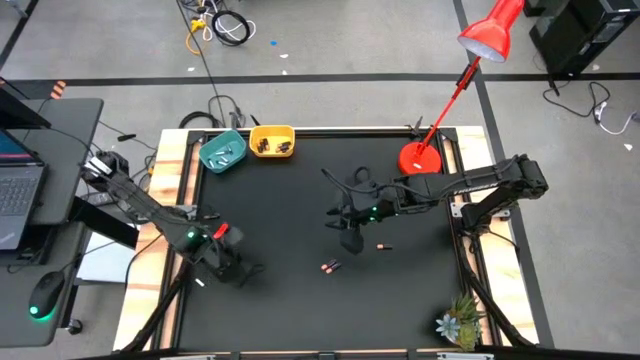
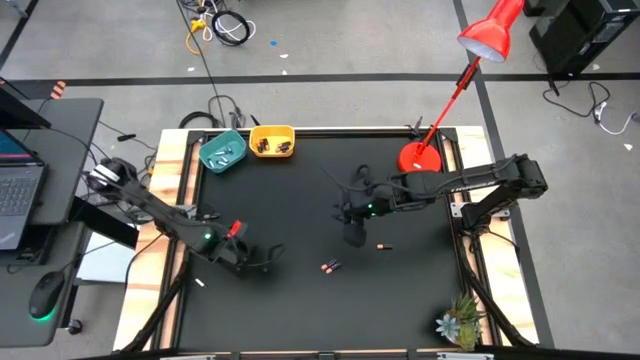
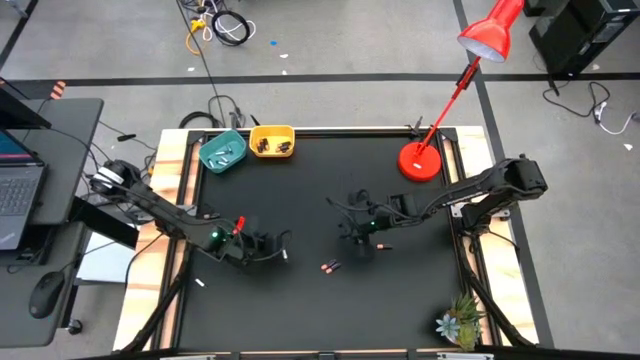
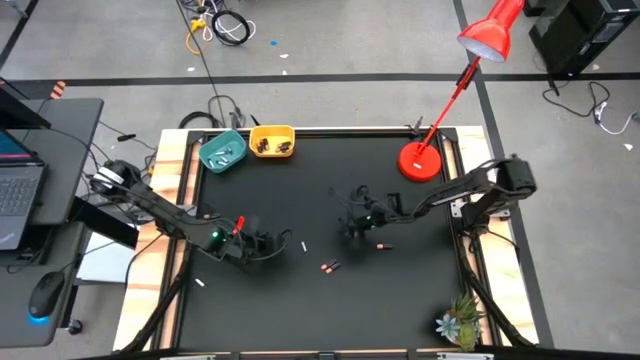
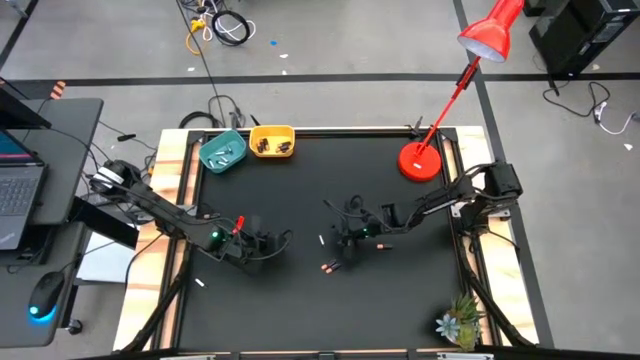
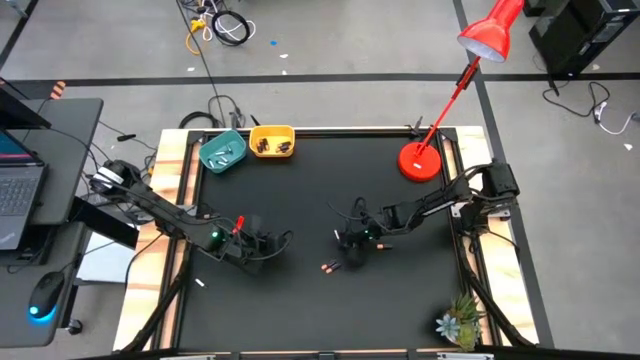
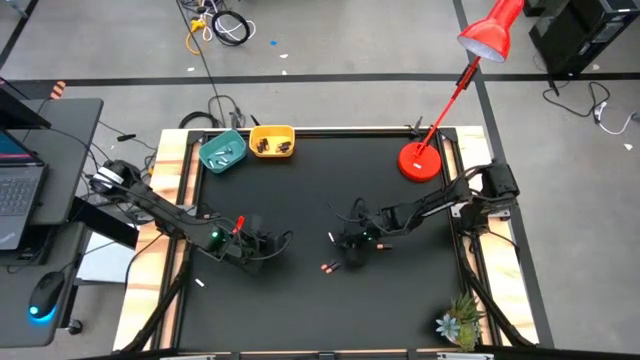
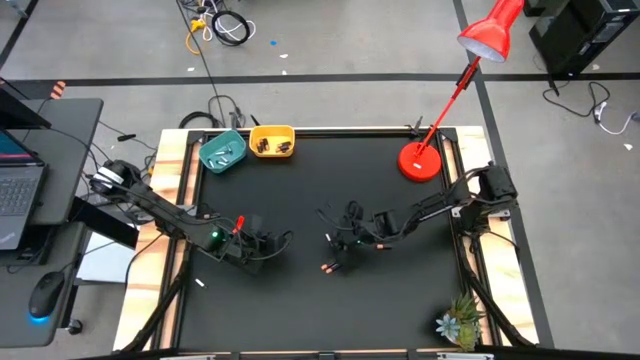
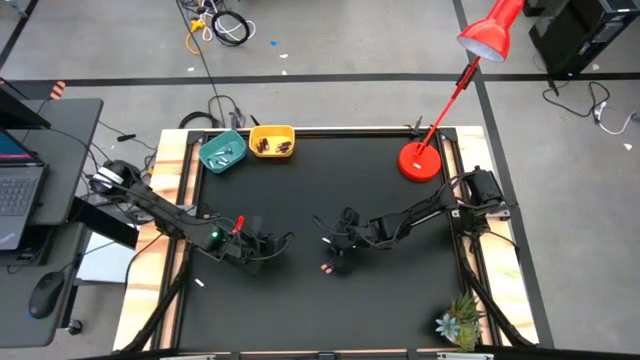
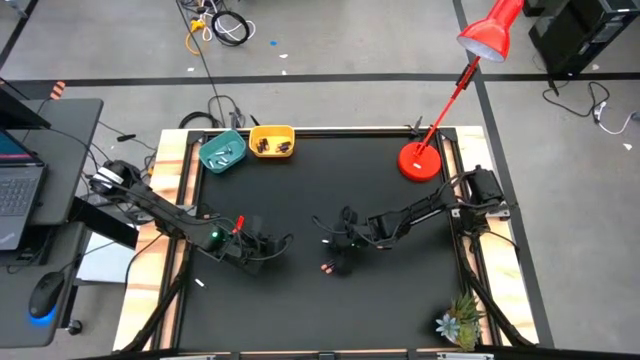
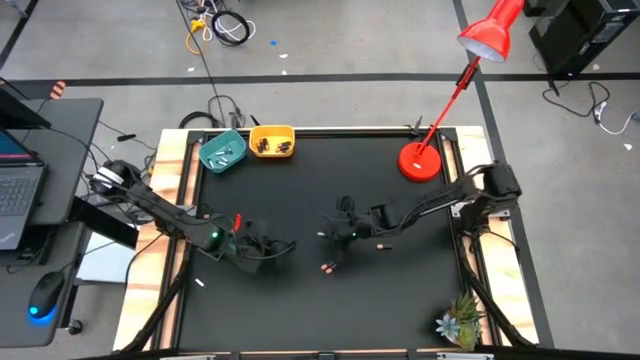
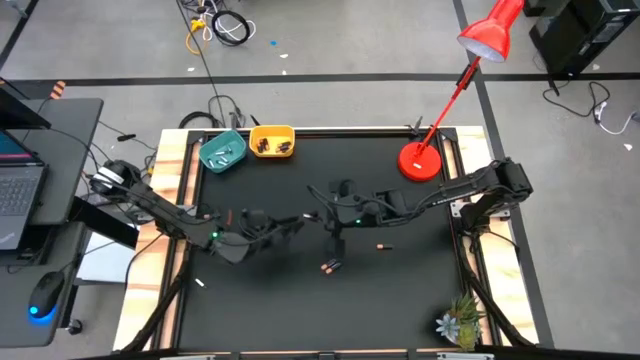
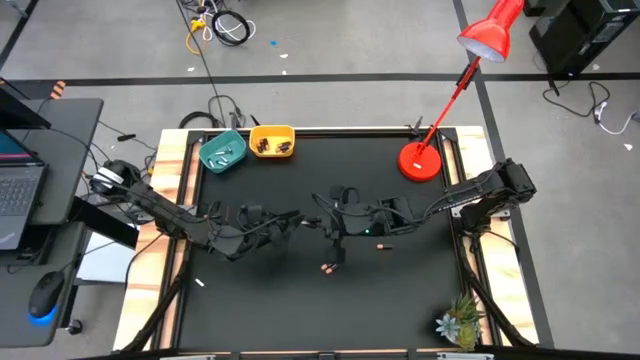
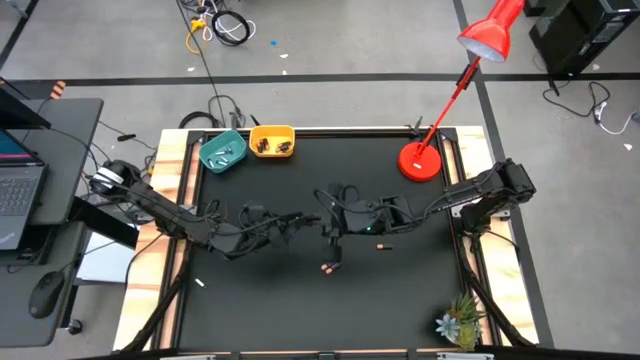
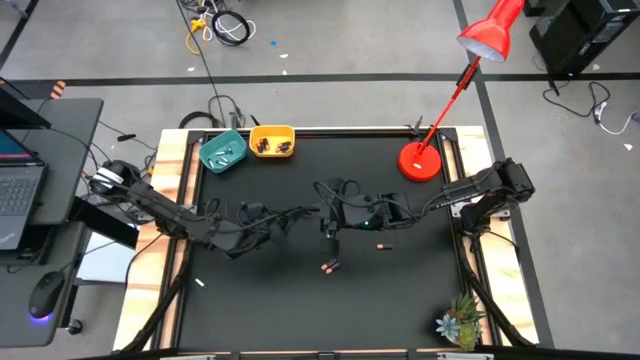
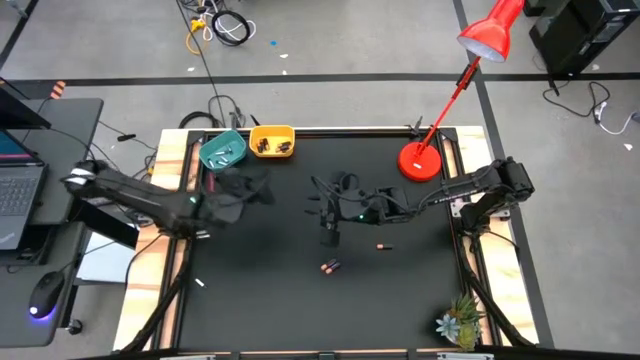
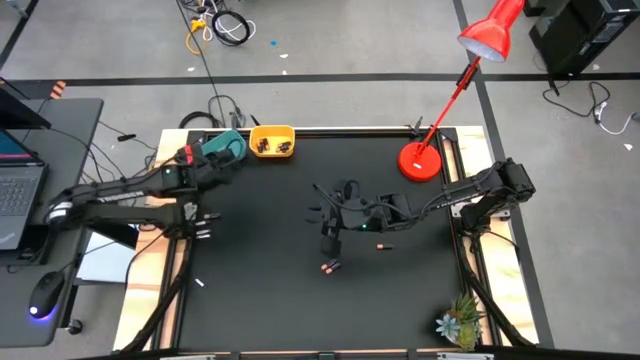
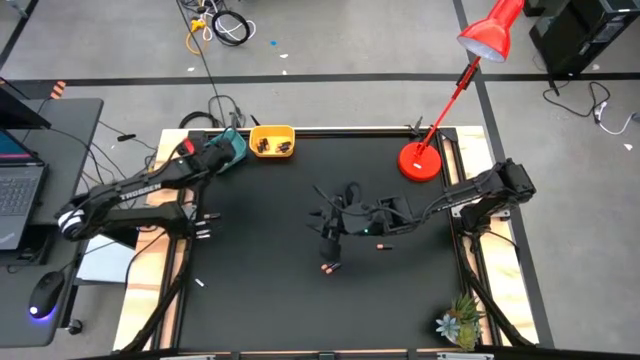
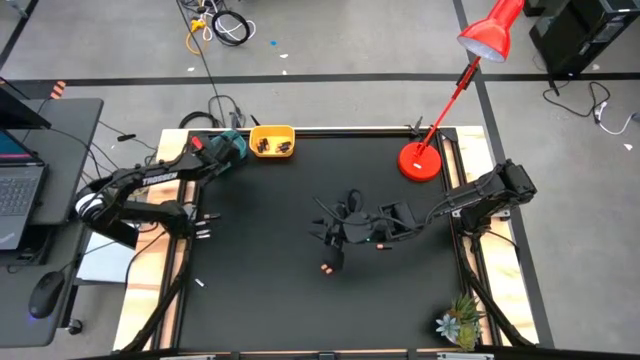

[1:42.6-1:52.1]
Task: Sort batteries
Put the silver battery into the blue bin

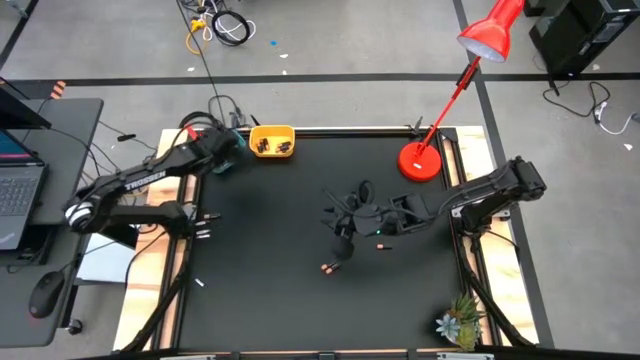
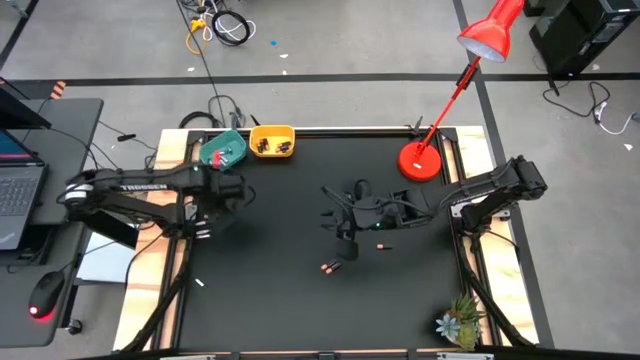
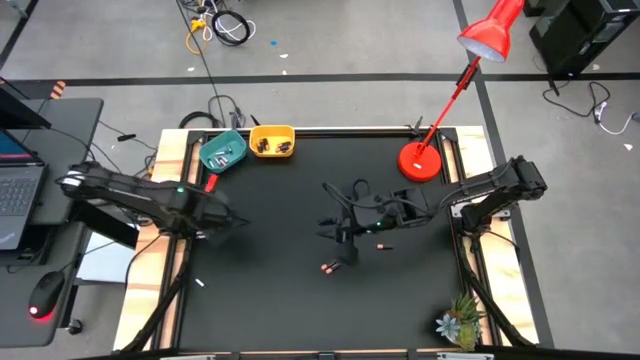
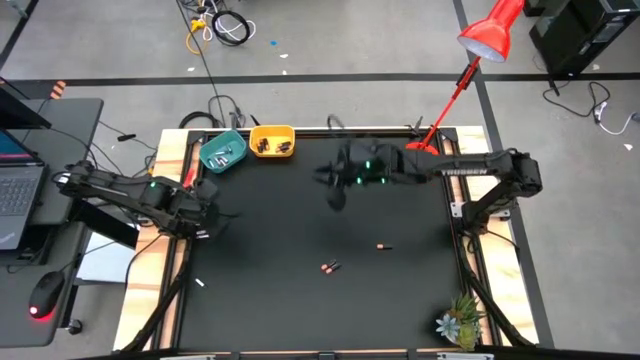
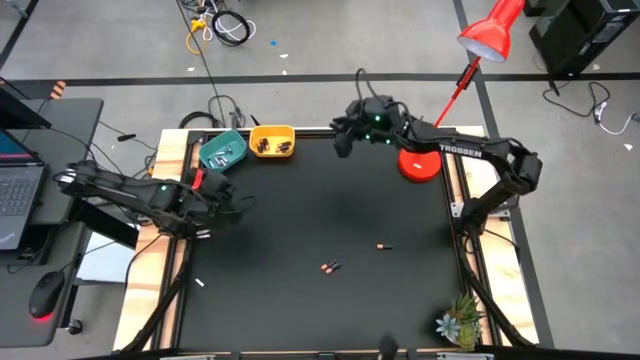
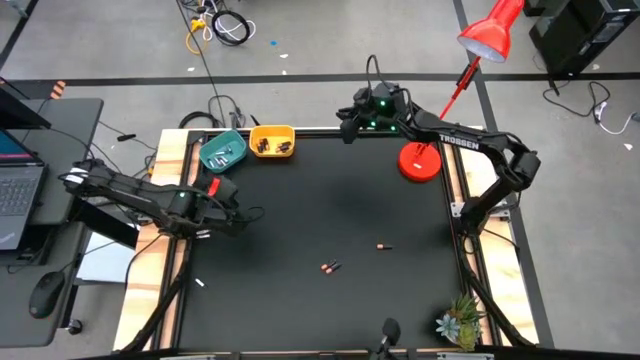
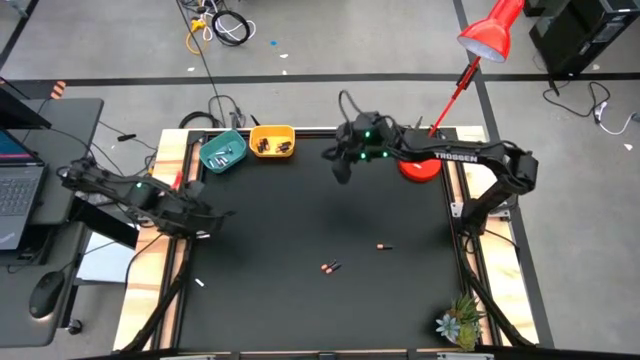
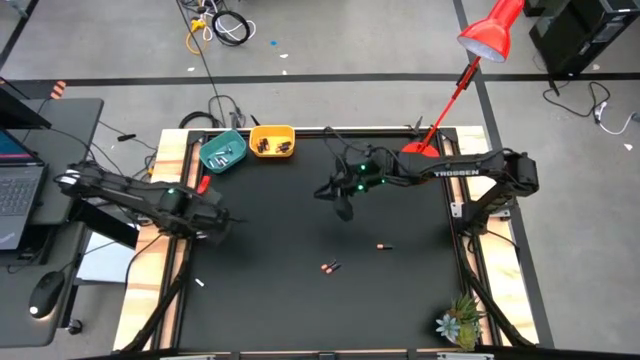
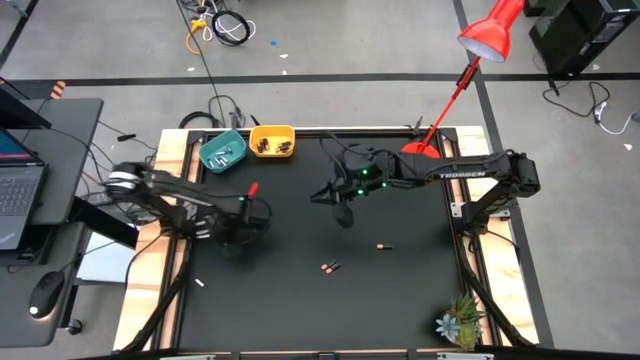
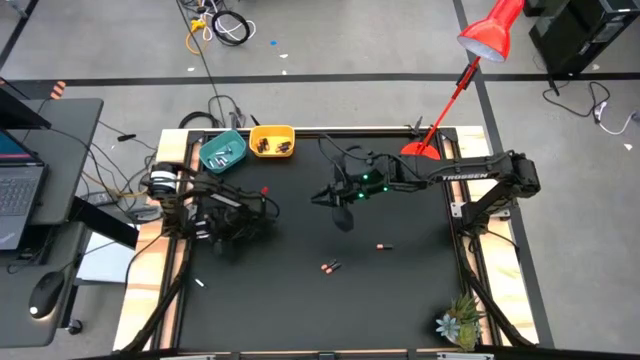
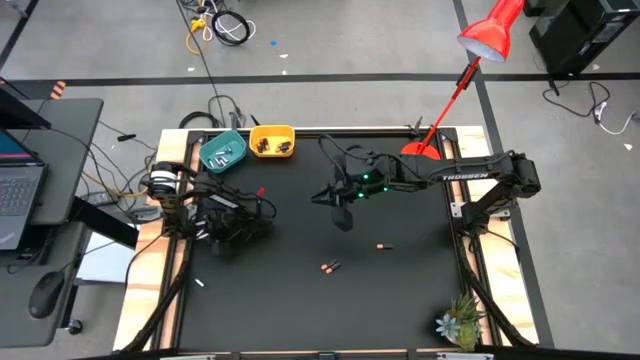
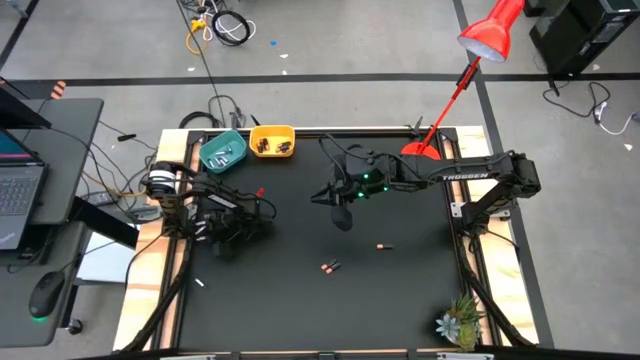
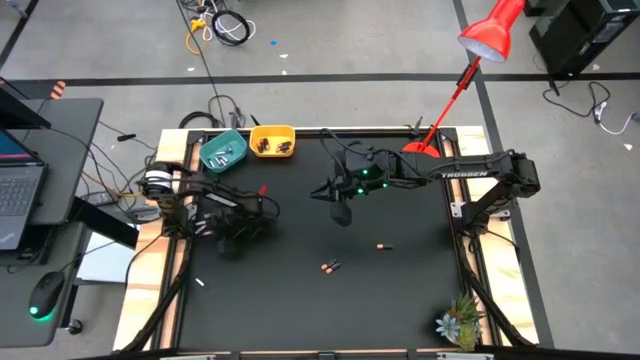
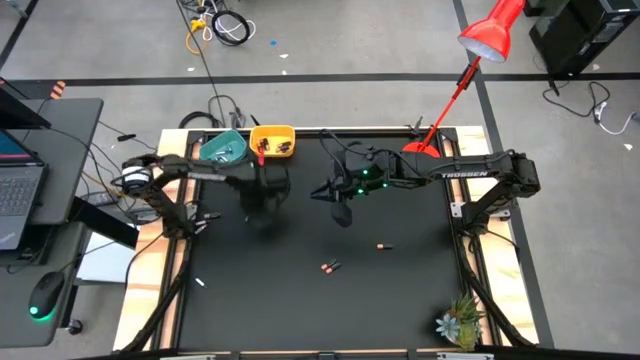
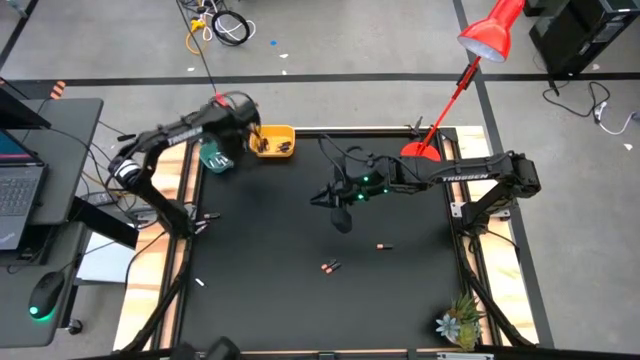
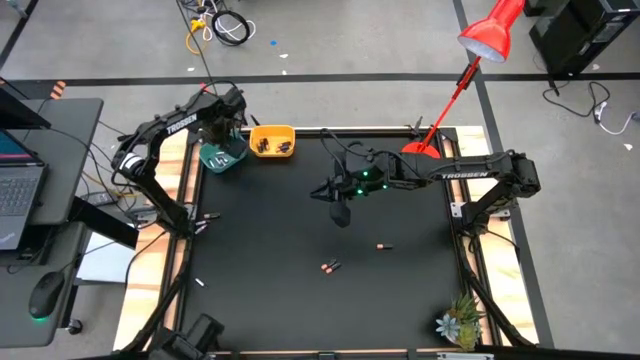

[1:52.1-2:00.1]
Put the silver battery into the blue bin

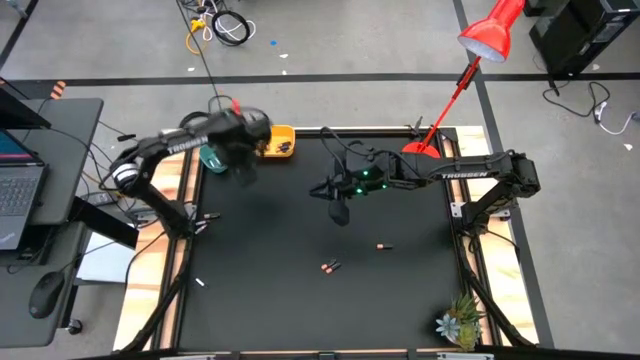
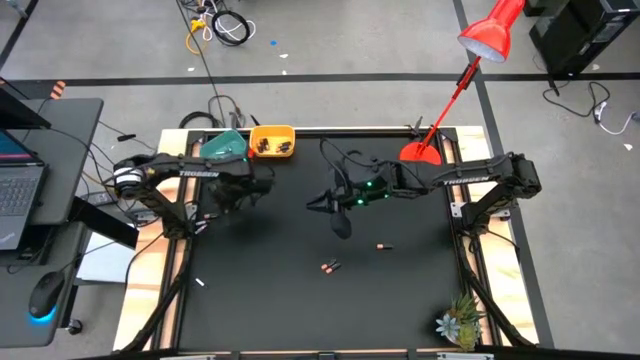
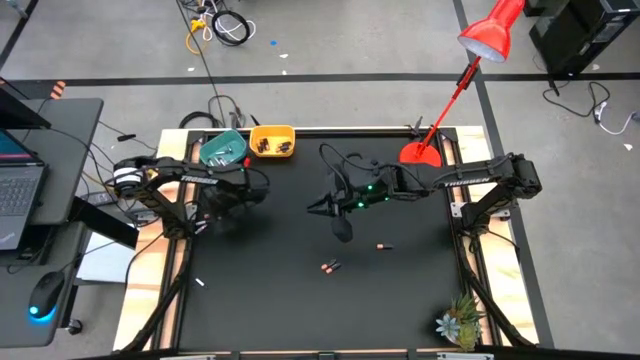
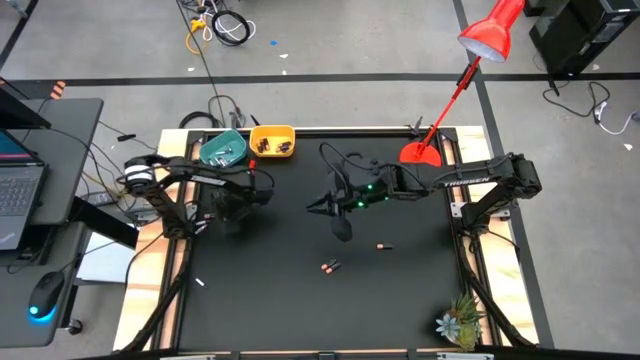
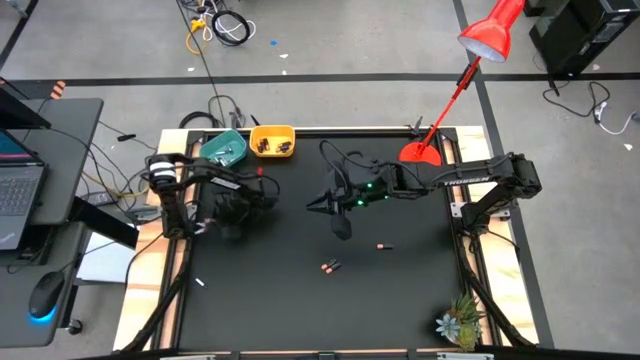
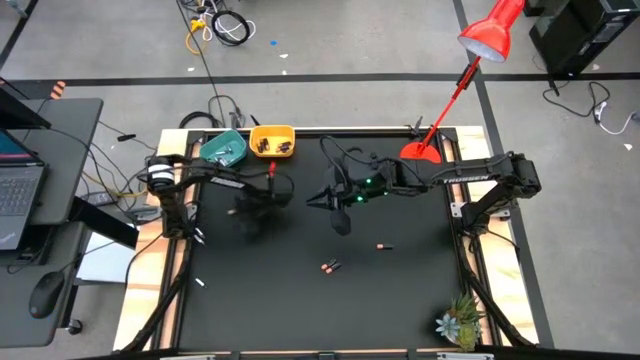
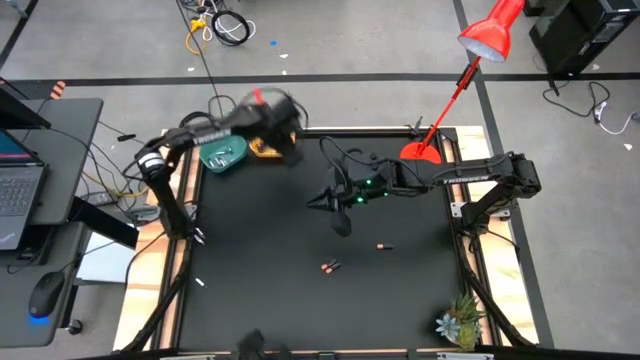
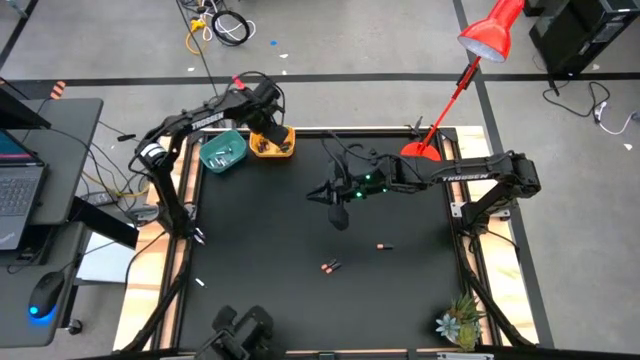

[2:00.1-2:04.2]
Put the black battery into the yellow bin
